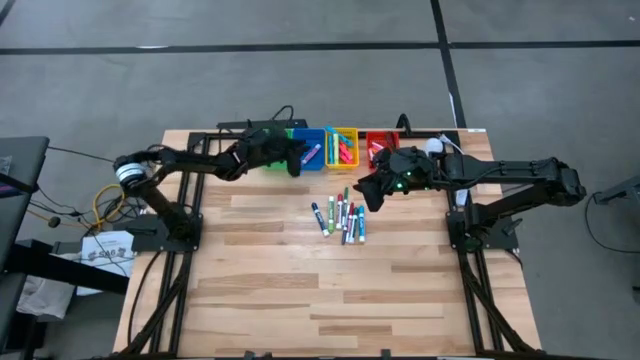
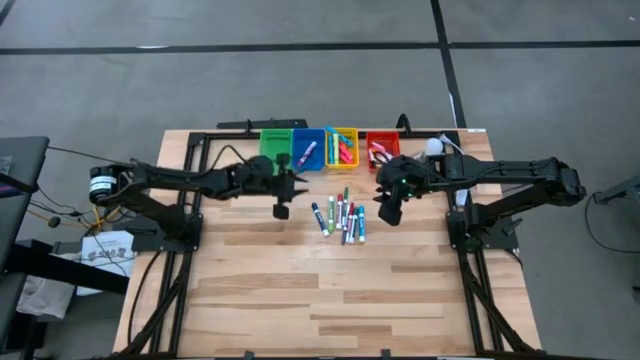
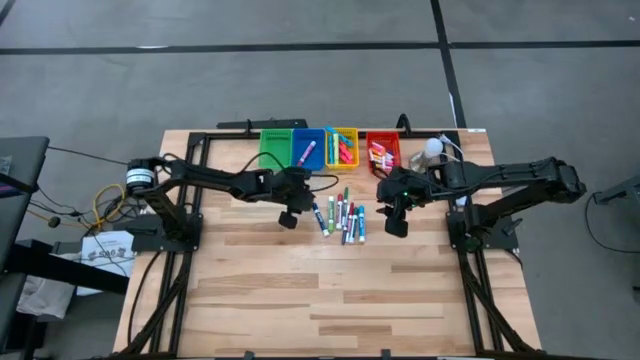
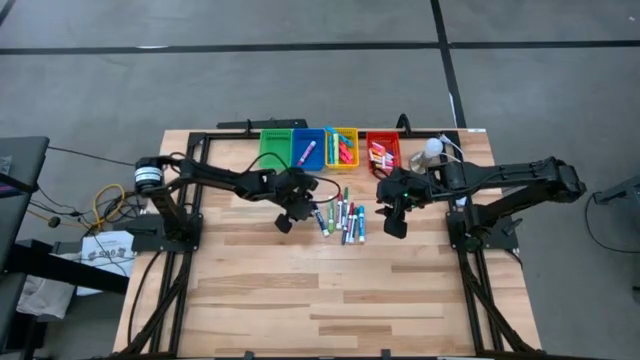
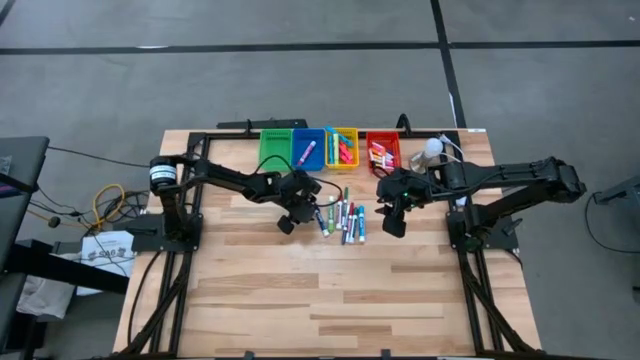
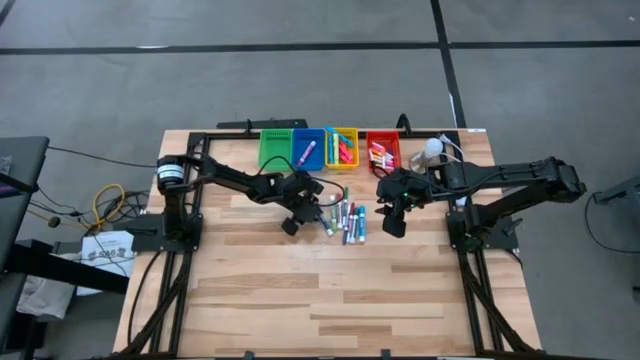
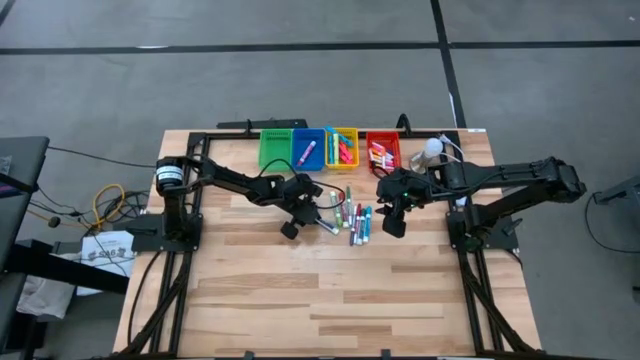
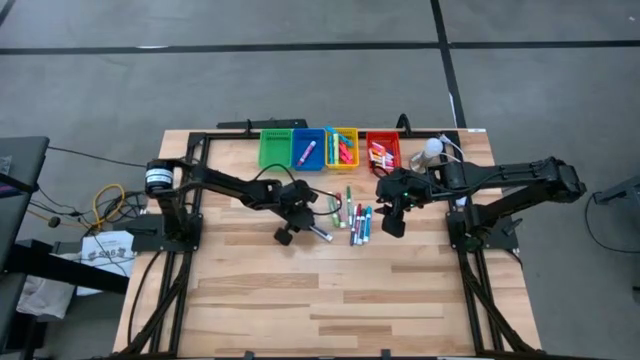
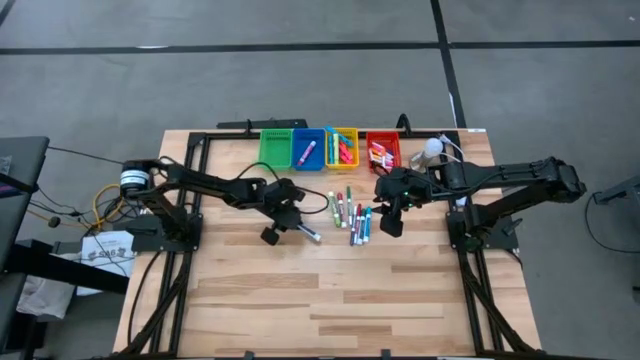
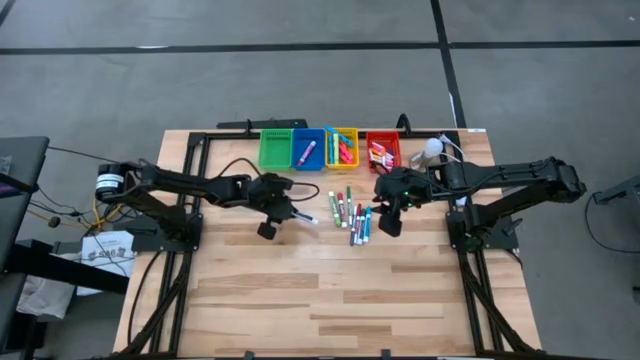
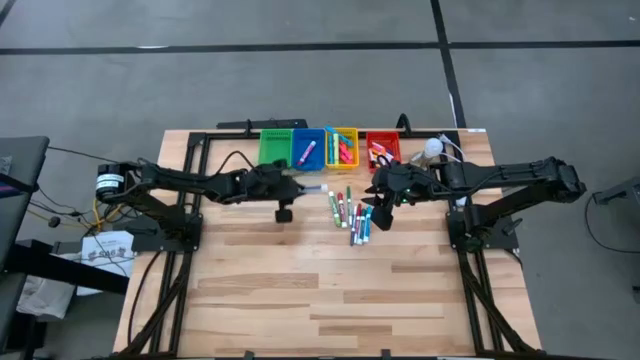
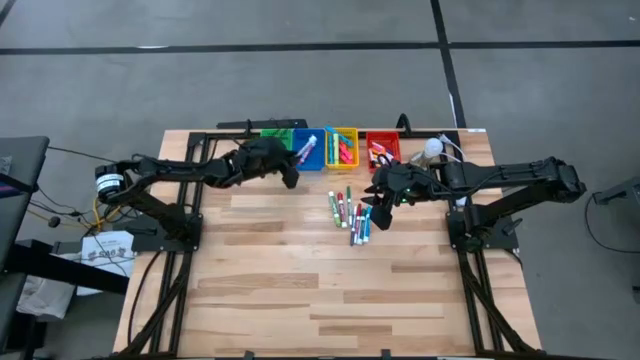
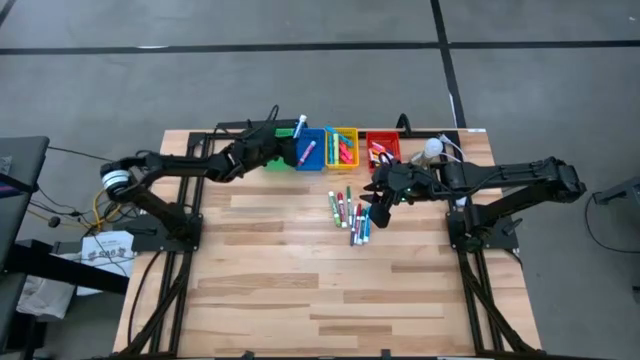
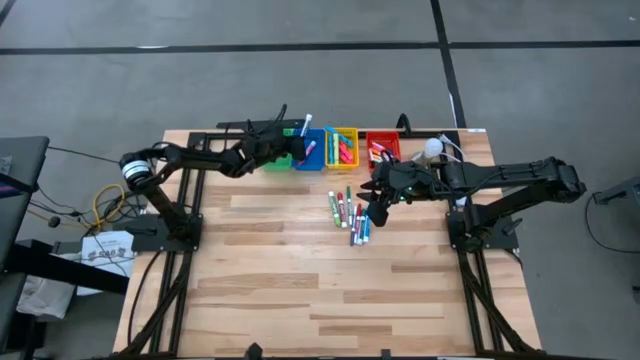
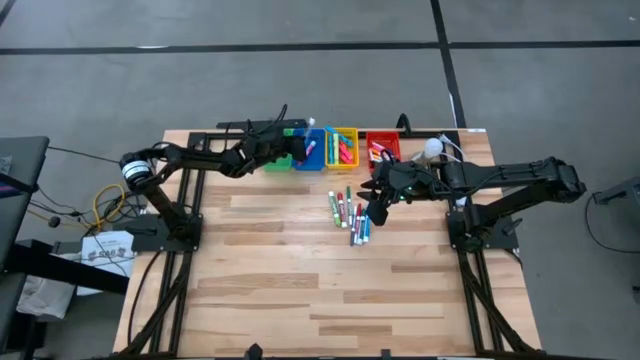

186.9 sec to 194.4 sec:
Task: Pick & Place Markers
Put the dark blue dry erase marker into the blue basket

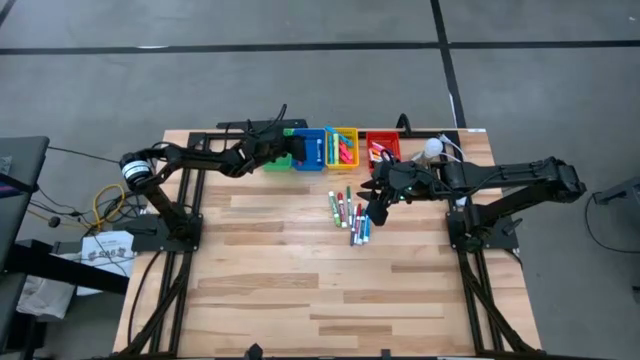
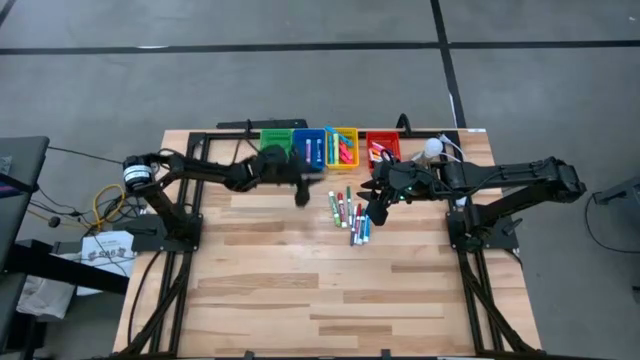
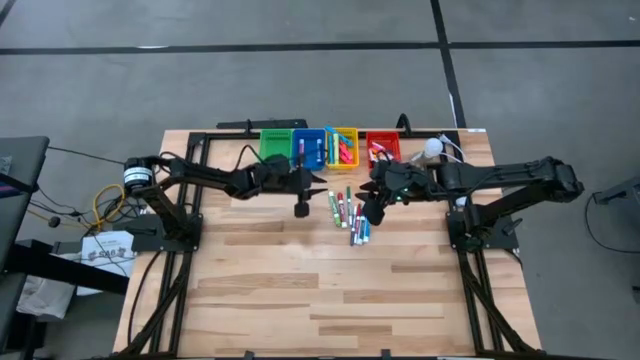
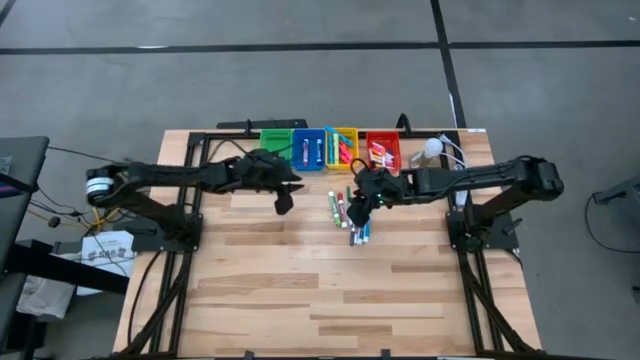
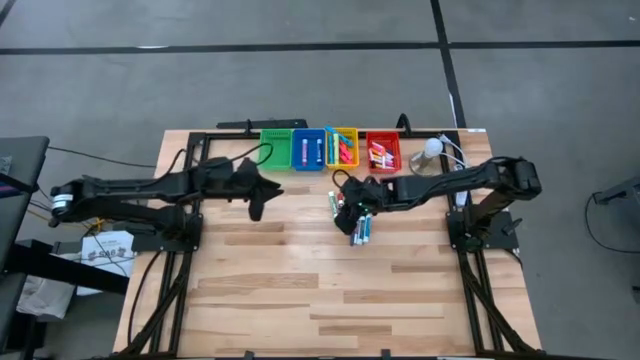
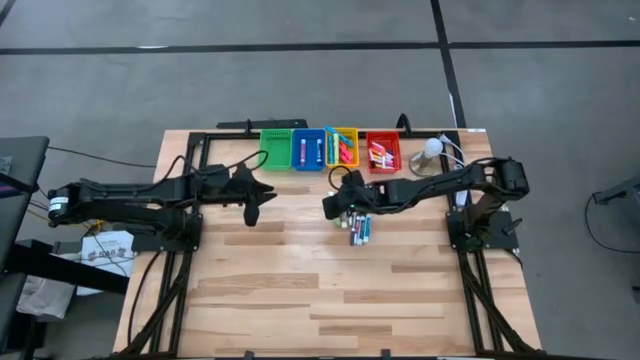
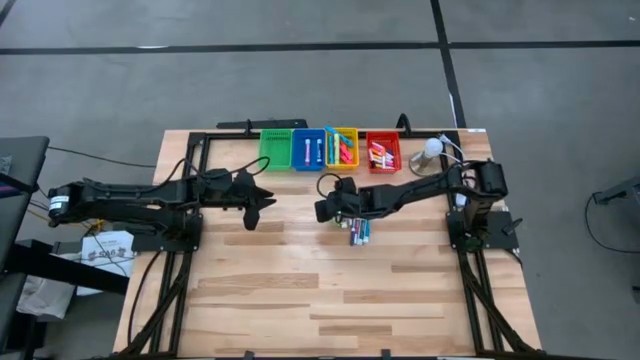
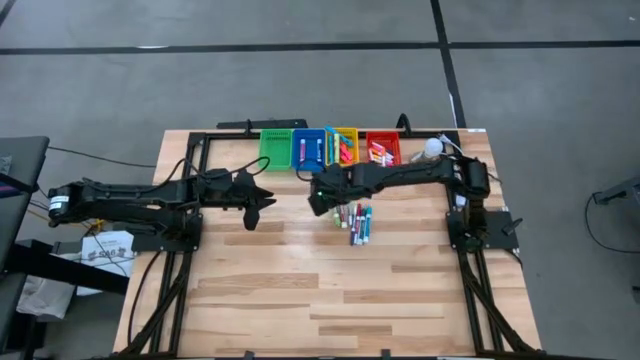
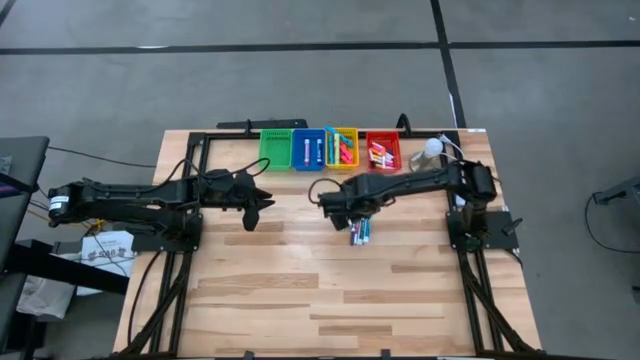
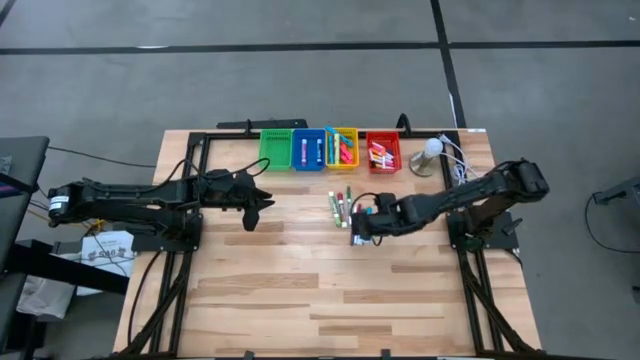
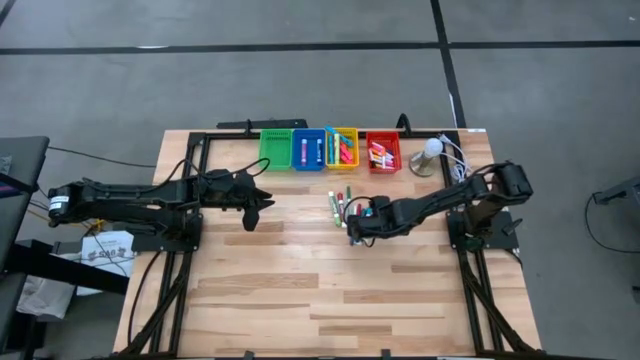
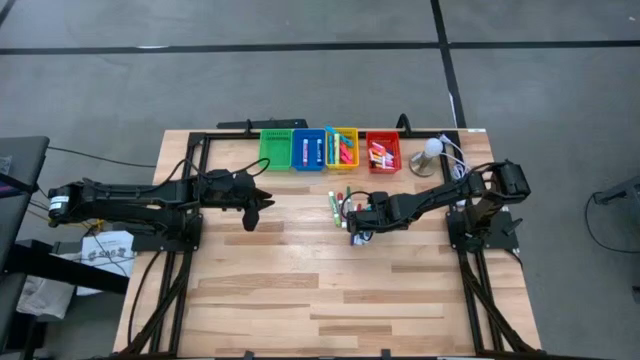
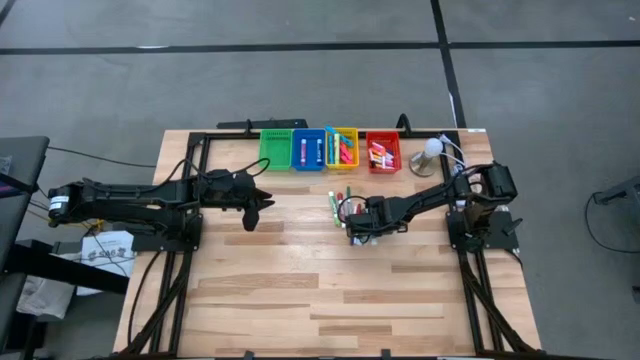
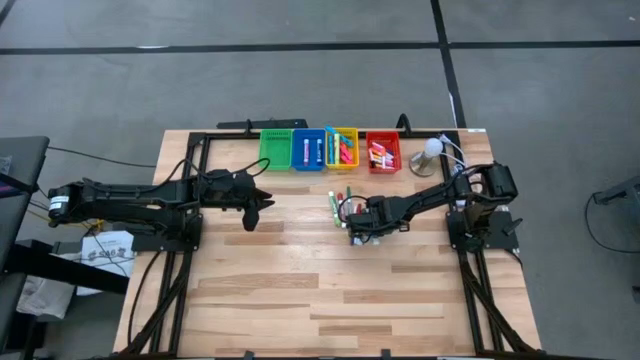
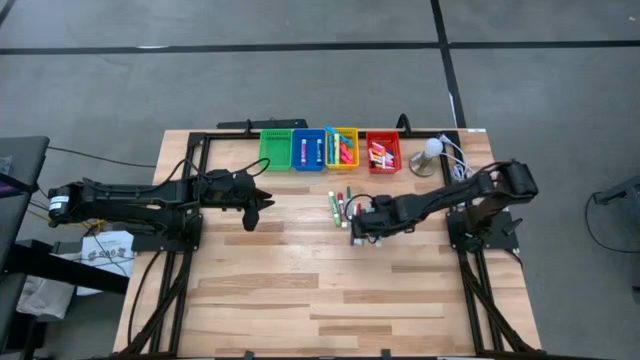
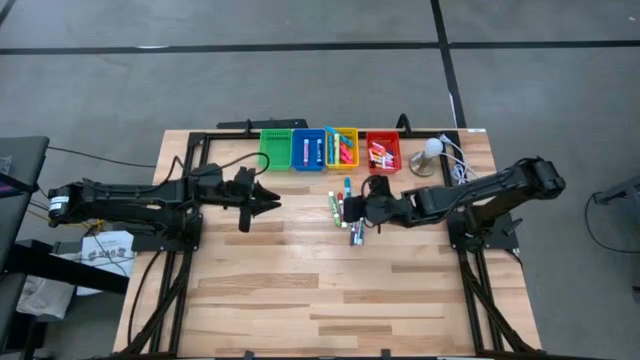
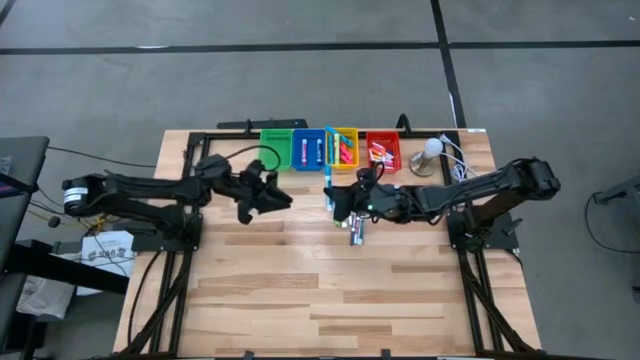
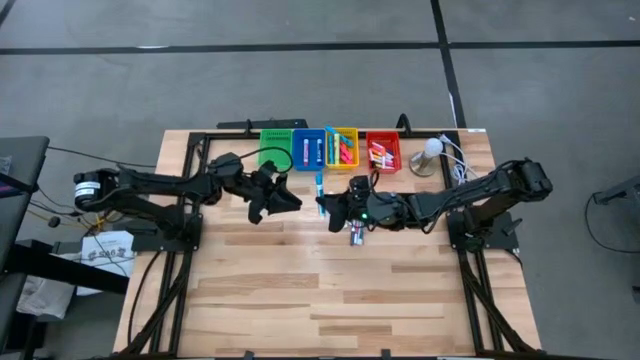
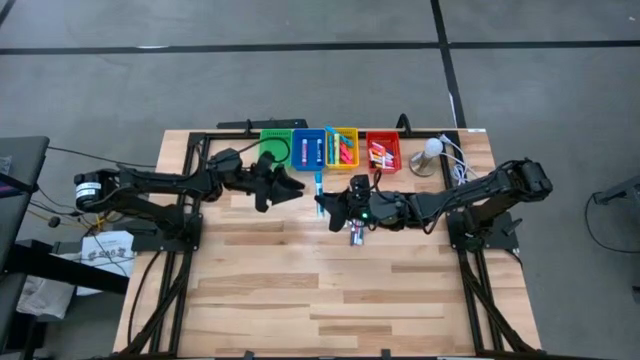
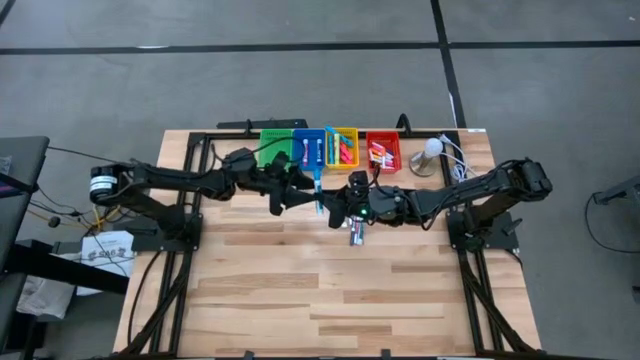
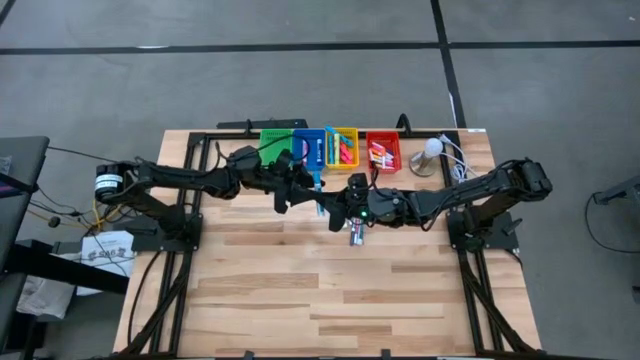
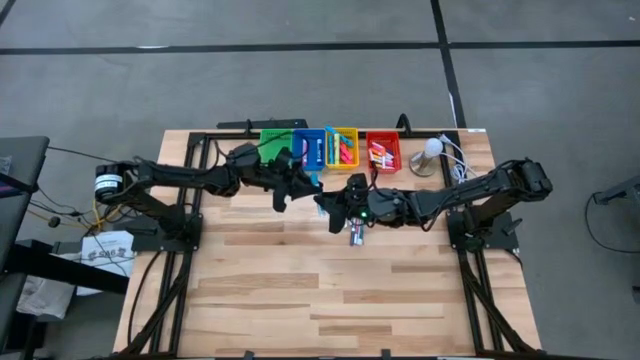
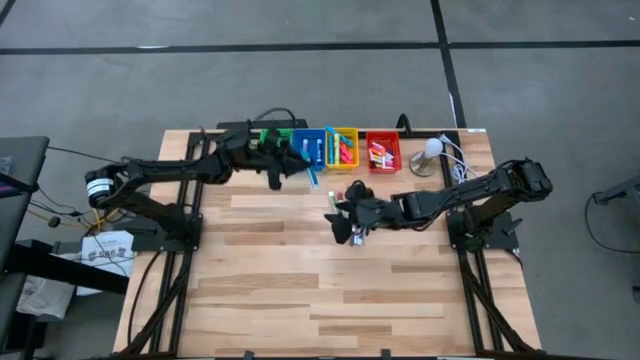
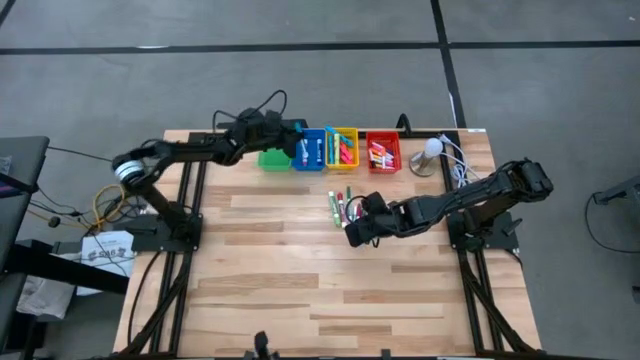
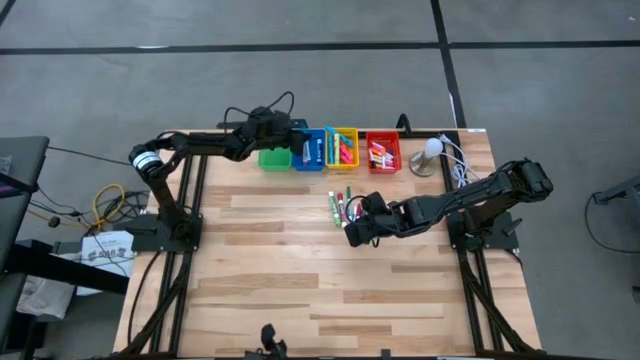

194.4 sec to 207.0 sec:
Put the blue dry erase marker into the blue basket

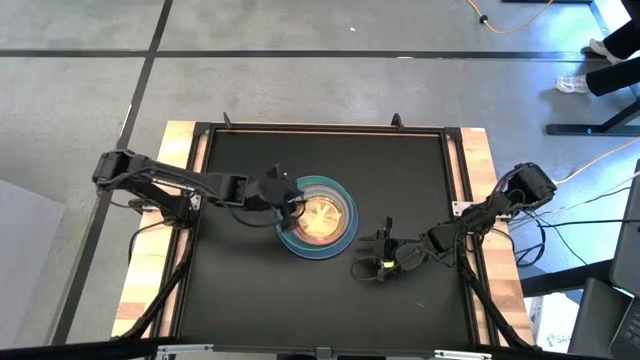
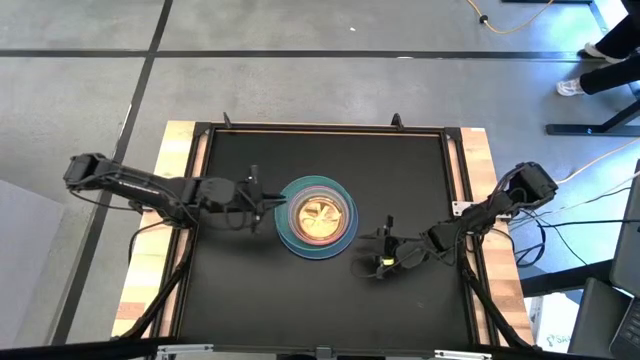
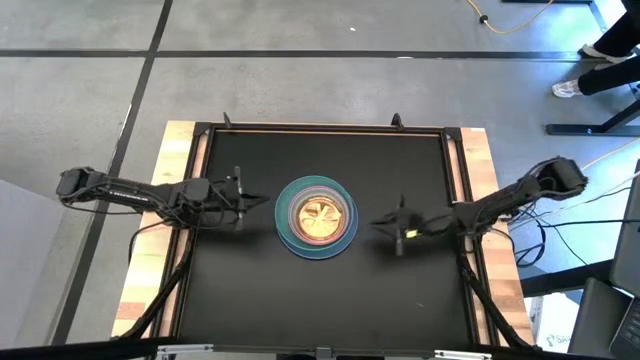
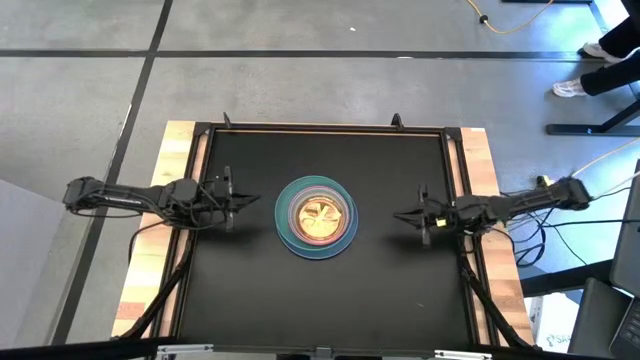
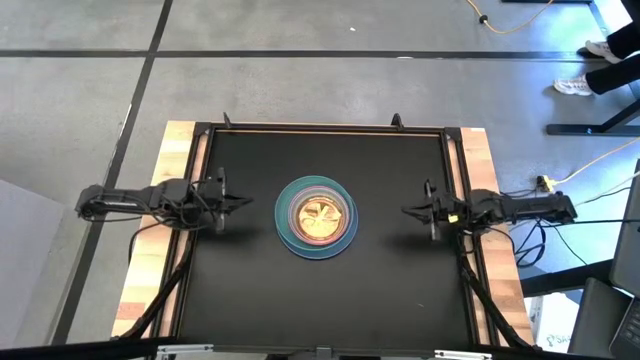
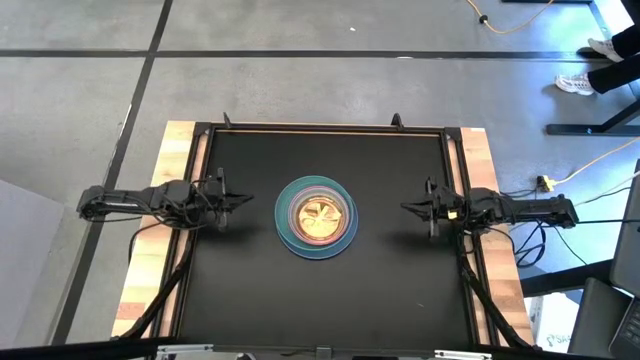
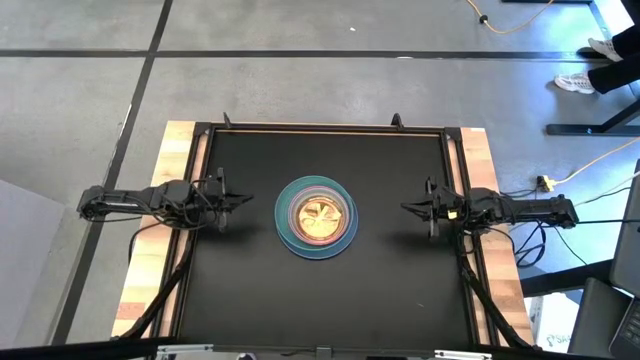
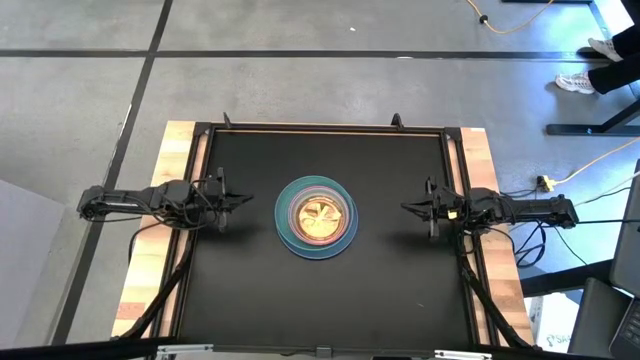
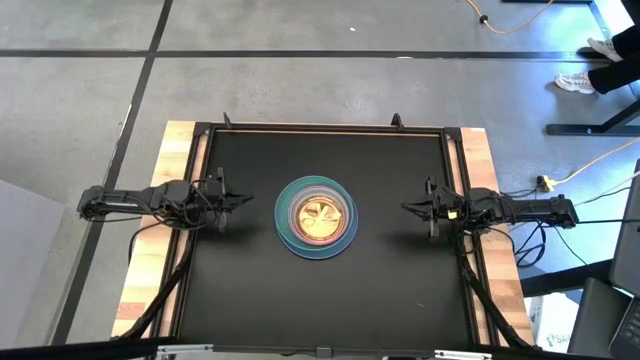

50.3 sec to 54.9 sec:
Task: Stack plastic plates
Return to Home Position
